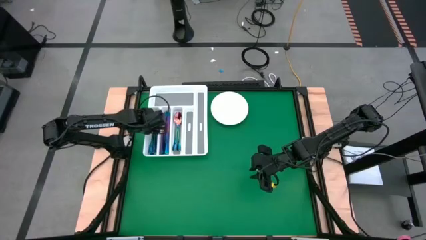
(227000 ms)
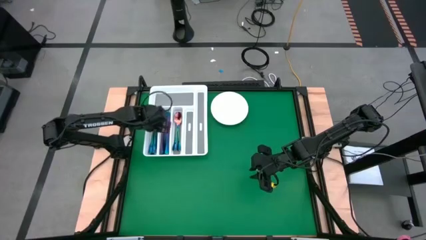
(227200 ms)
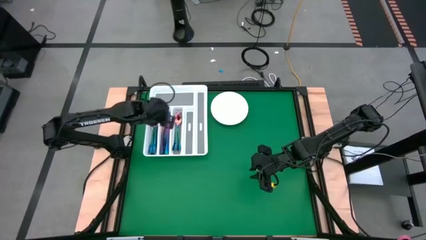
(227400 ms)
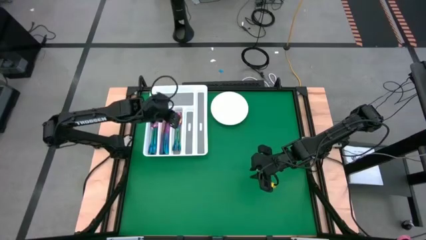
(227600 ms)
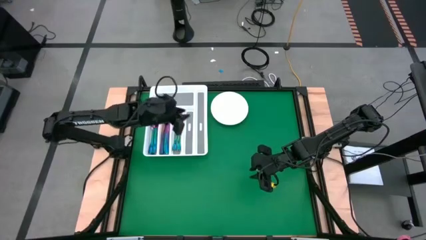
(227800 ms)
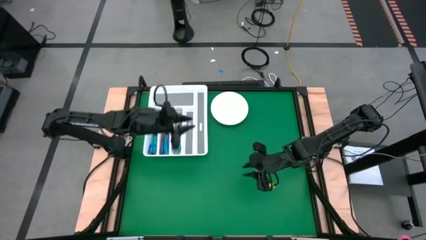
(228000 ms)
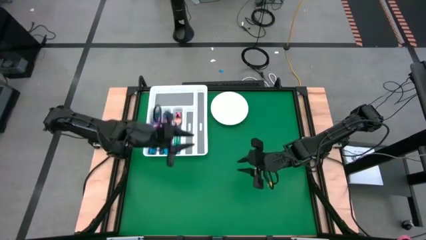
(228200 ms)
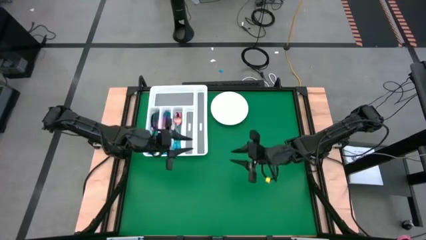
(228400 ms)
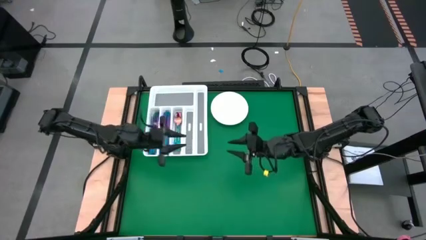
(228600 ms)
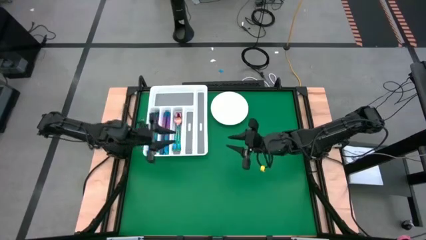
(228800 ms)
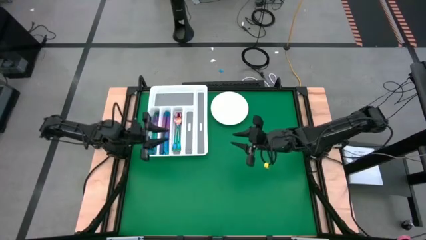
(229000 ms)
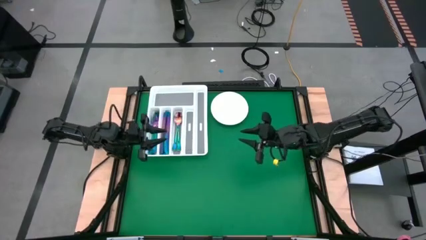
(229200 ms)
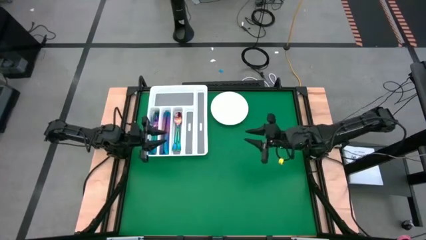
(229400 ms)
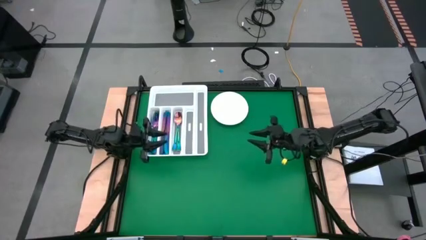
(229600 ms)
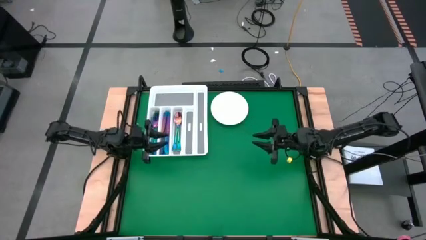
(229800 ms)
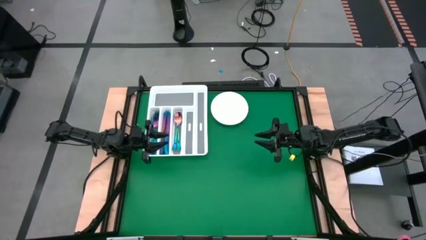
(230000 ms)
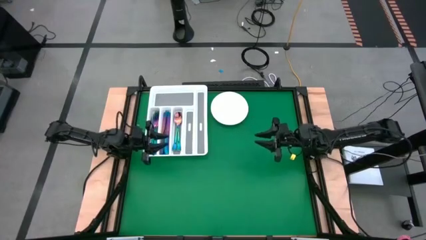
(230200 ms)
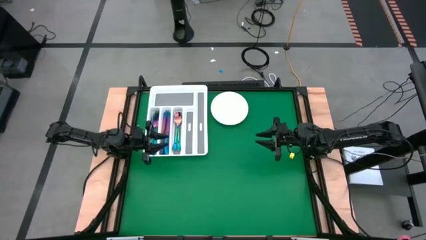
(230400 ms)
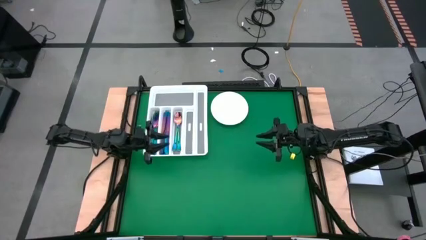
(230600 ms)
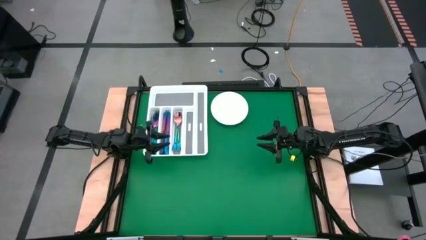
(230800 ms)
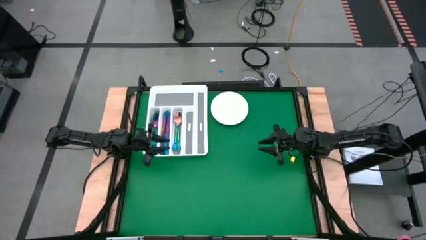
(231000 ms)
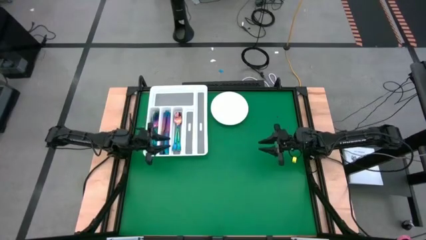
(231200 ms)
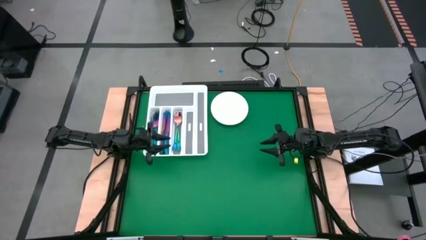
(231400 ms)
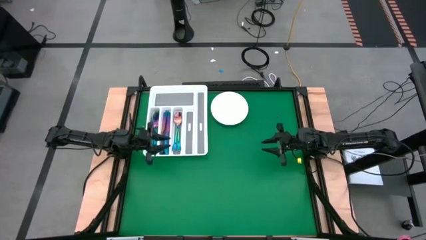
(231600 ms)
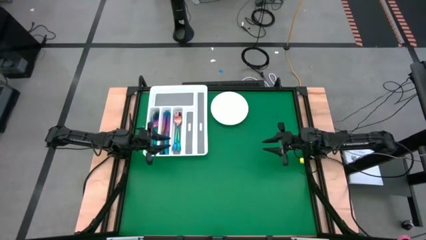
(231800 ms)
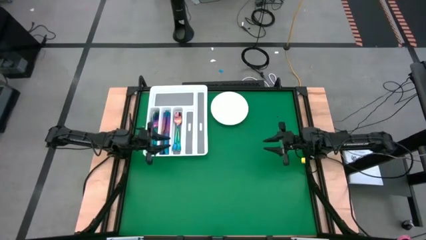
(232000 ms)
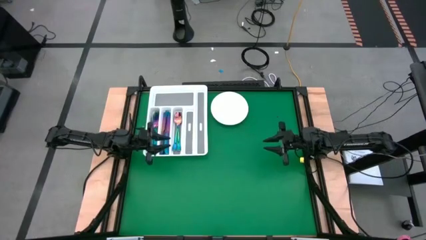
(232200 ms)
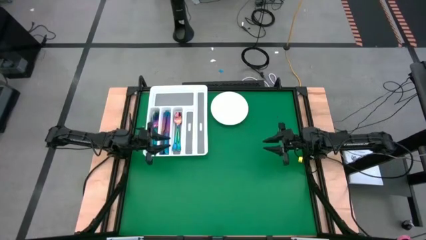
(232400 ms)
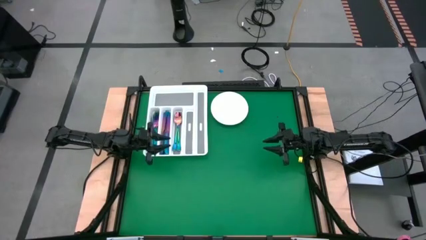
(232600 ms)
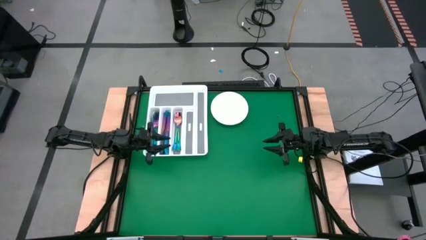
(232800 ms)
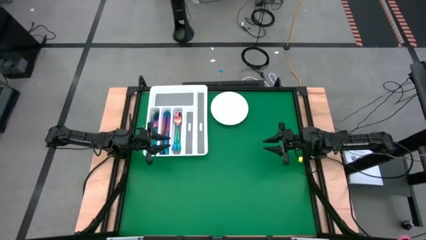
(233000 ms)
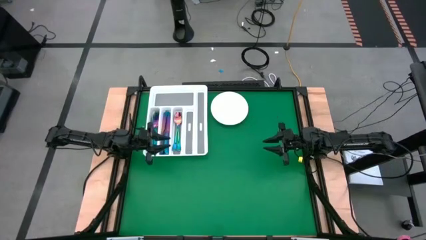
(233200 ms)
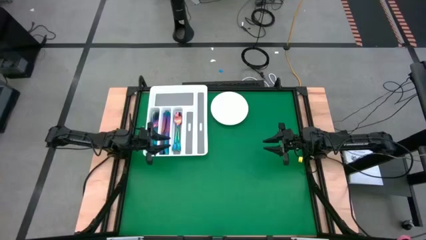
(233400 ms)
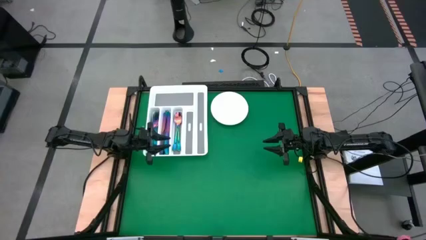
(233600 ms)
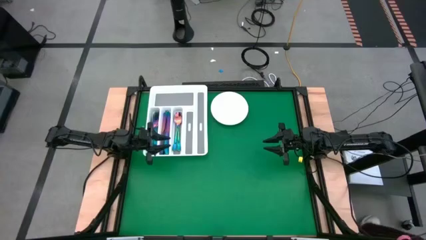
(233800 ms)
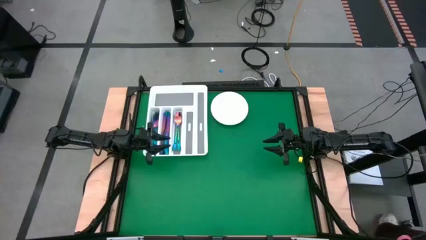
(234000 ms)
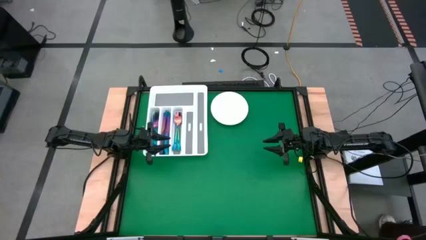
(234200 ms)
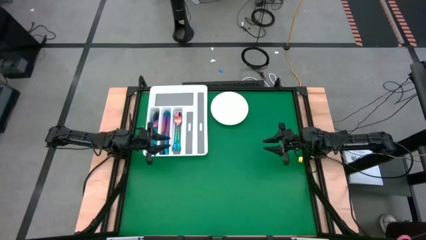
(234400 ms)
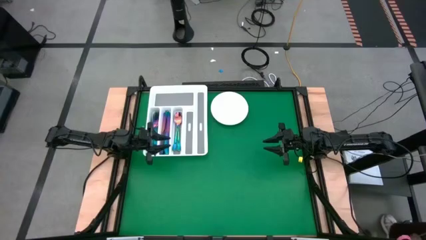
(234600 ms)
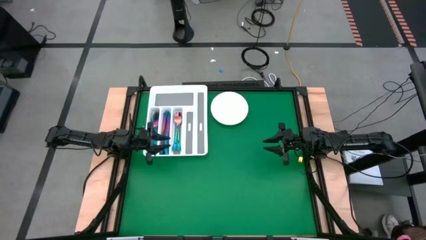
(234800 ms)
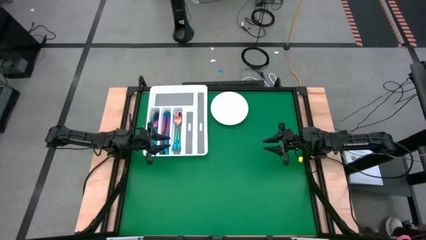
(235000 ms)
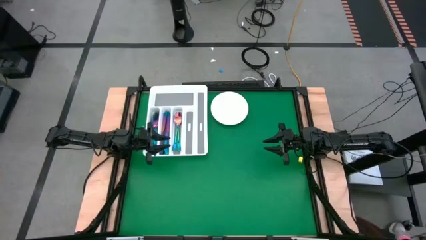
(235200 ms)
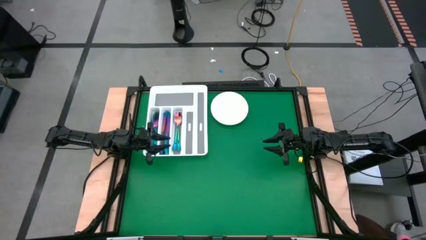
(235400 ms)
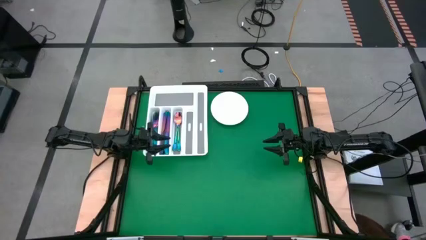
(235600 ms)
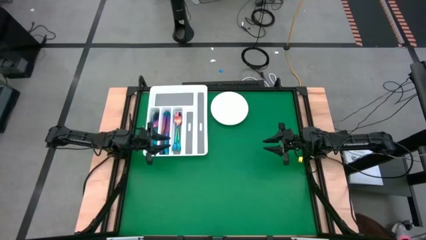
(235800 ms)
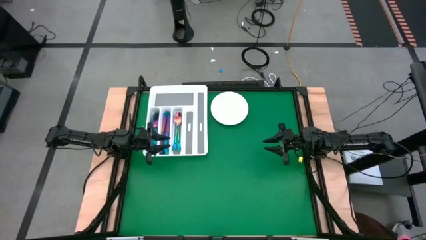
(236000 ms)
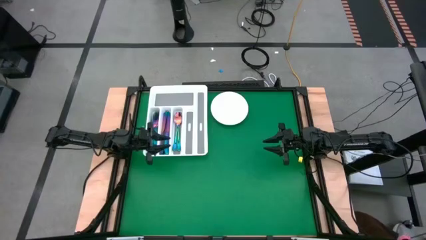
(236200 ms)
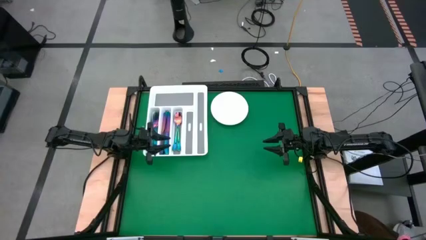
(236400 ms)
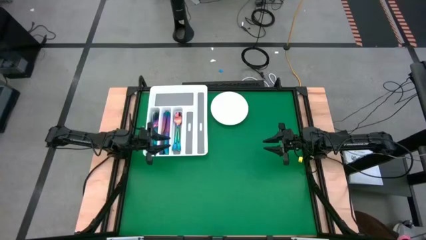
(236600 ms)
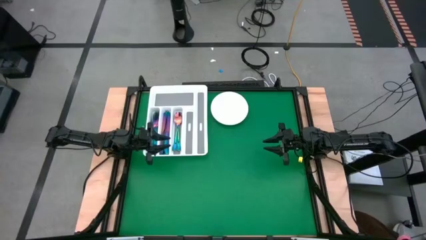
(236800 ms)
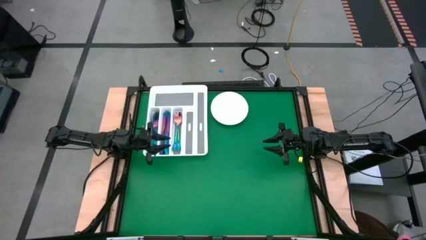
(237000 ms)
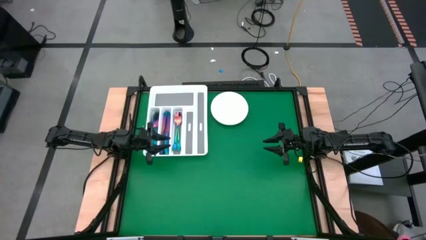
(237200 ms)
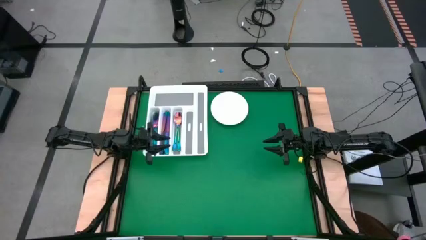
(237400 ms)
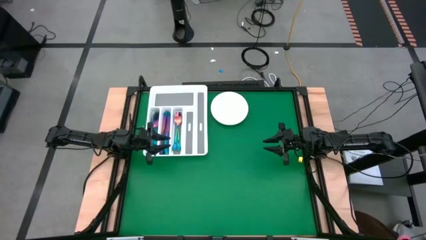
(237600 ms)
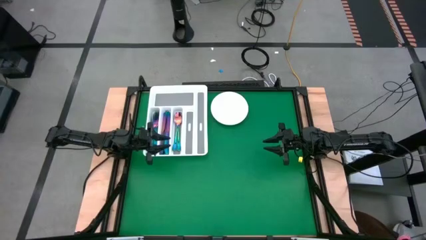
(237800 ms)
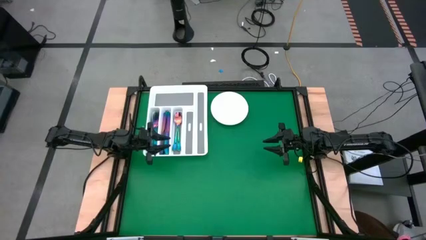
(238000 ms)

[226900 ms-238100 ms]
Task: Sort silverware
Return to Home Position

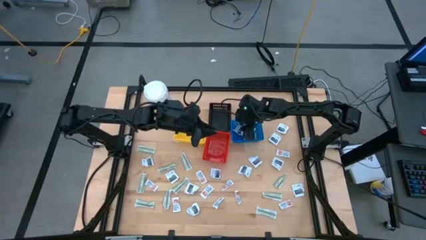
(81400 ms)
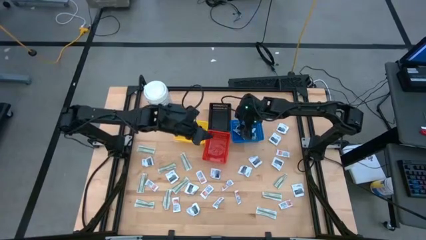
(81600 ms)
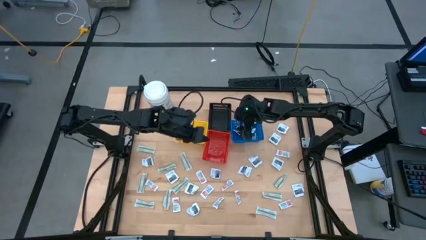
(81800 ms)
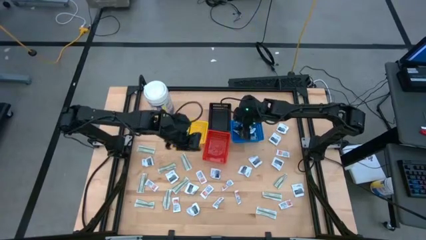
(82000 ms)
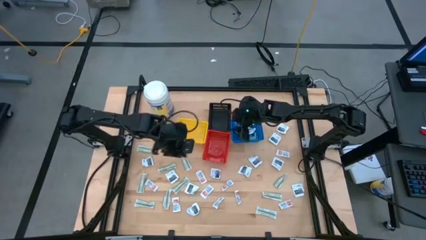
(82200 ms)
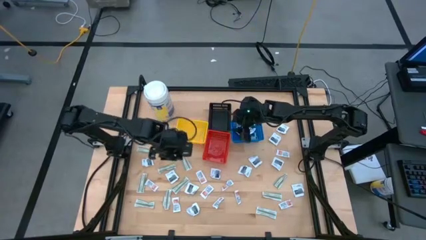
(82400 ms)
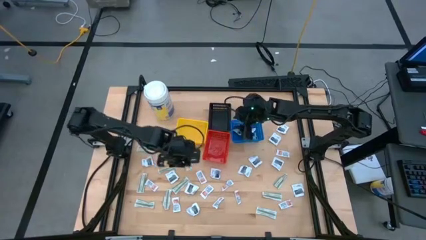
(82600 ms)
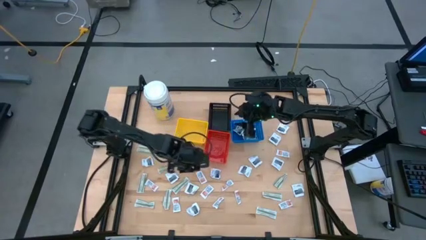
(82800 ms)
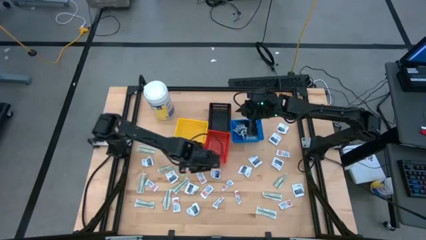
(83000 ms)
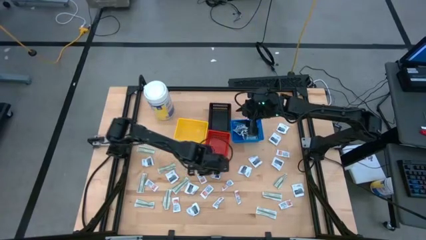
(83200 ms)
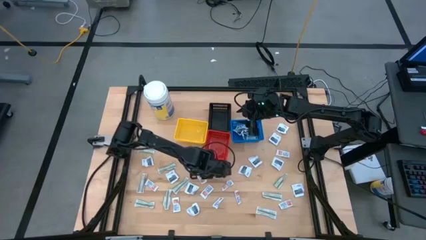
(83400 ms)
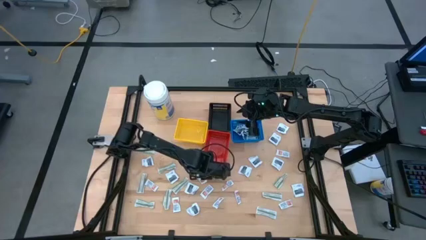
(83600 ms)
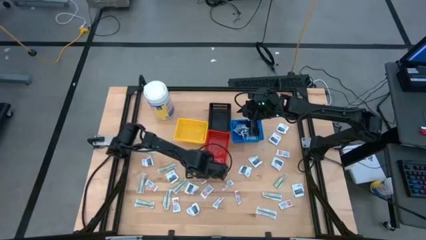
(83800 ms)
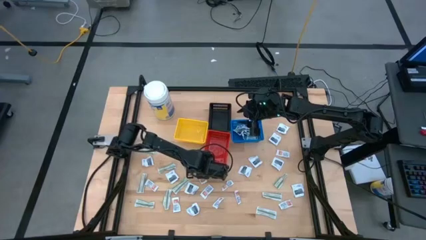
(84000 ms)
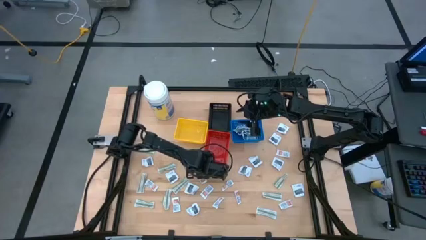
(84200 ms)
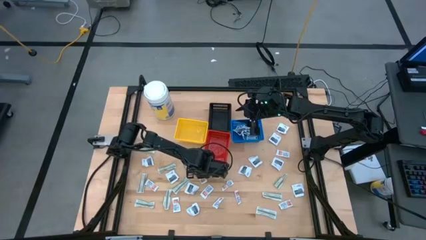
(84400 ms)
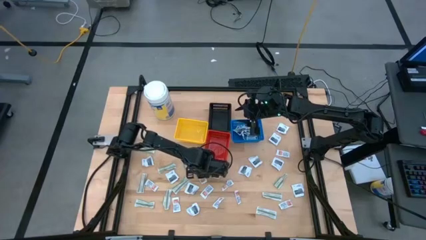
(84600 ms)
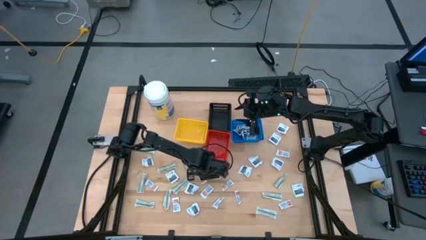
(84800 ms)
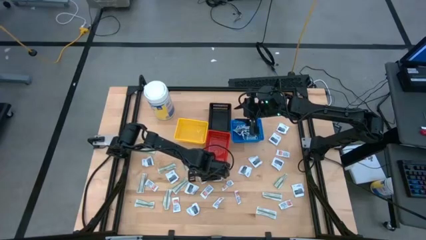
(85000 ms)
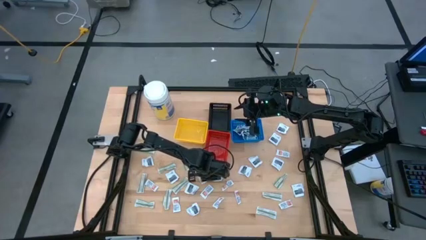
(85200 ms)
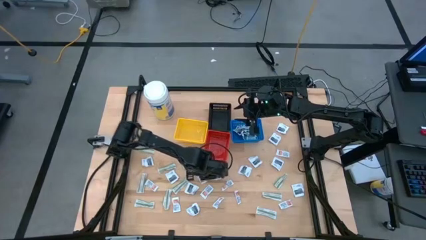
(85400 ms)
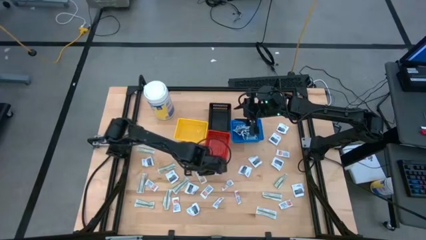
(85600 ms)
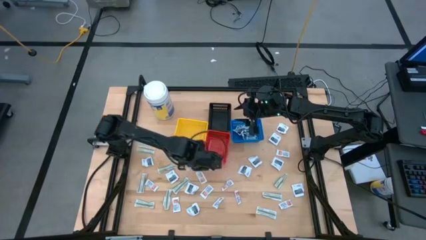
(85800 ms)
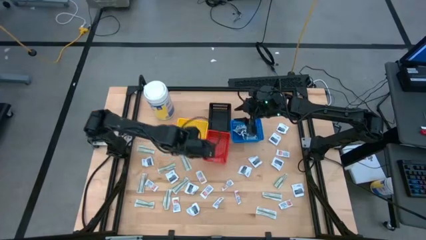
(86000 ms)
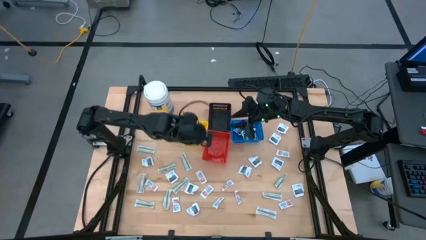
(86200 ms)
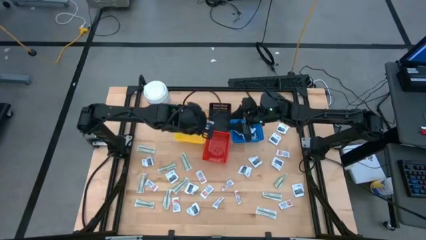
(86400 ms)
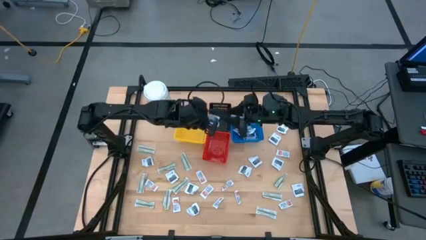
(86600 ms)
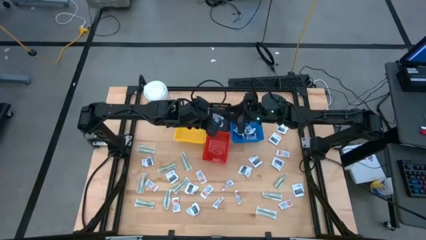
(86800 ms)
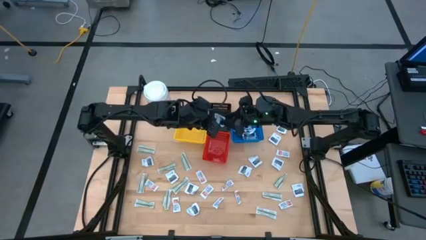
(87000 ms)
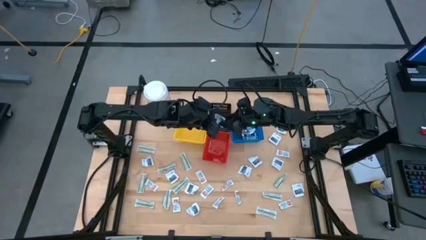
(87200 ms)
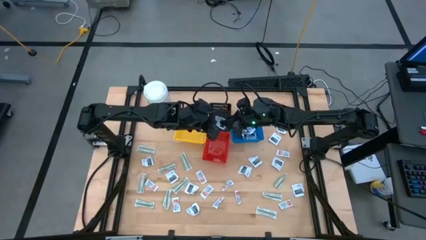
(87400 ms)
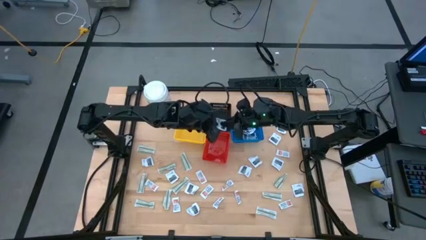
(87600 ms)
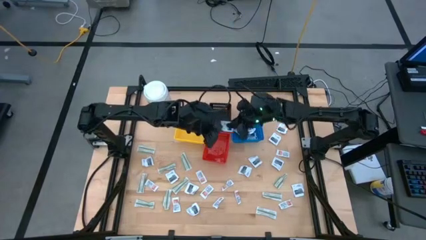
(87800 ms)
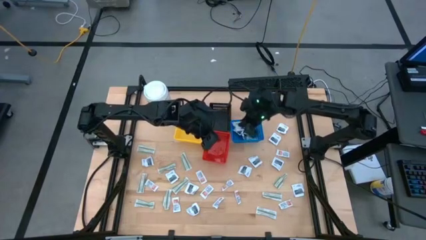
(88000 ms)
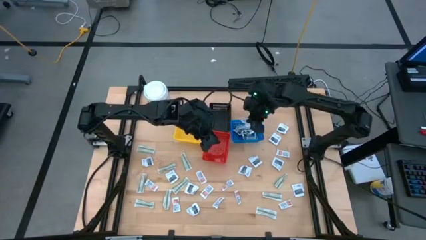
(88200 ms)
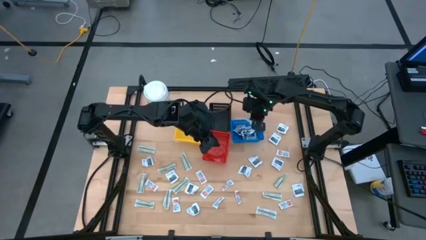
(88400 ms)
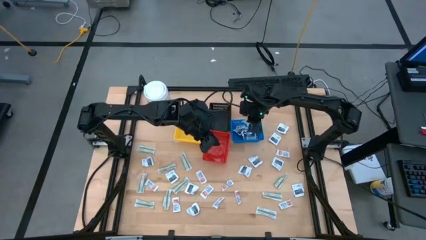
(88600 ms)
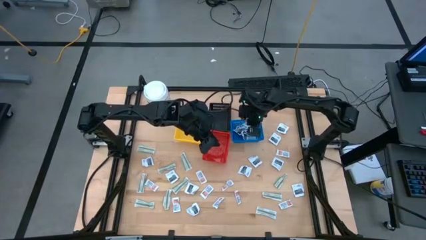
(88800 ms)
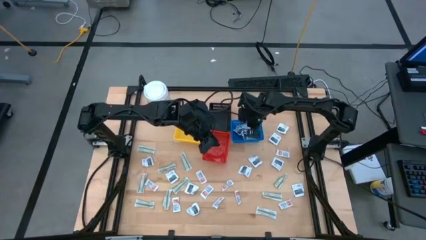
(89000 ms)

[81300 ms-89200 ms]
Task: Pick & Place First Aid Supplies
Put the alcohol pad into the blue bin
